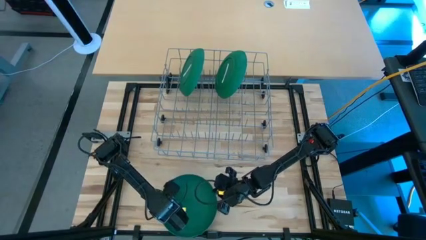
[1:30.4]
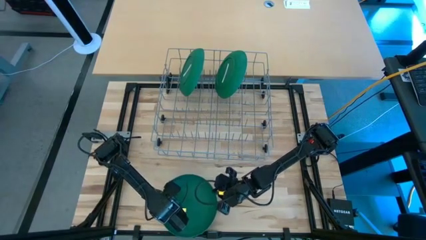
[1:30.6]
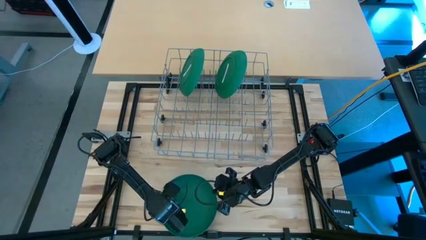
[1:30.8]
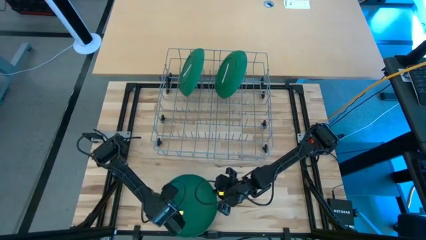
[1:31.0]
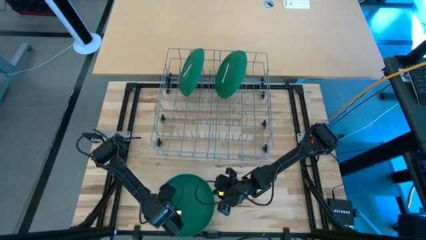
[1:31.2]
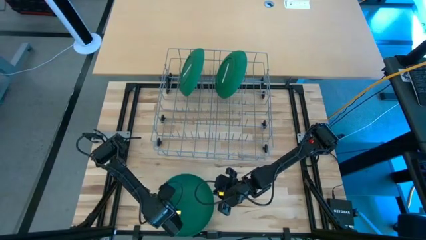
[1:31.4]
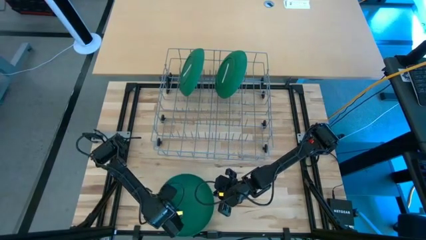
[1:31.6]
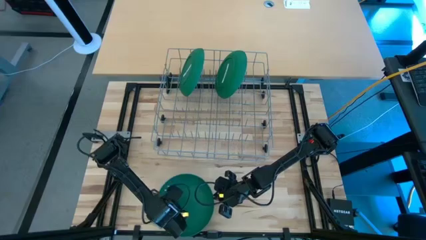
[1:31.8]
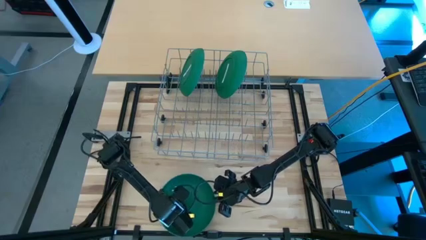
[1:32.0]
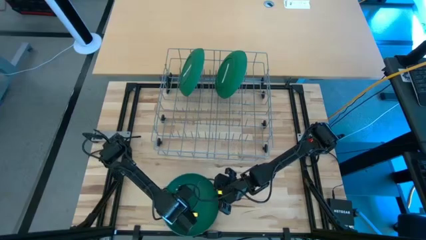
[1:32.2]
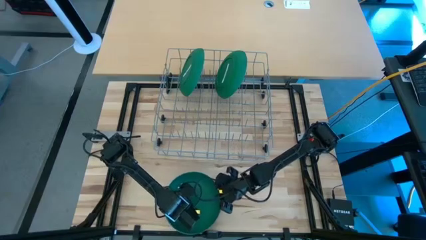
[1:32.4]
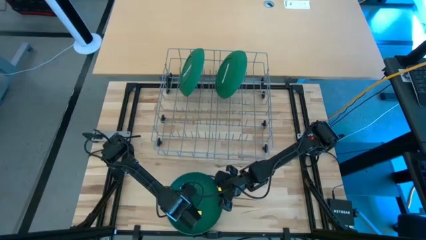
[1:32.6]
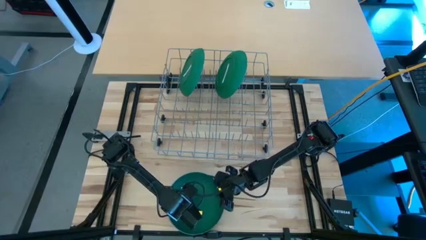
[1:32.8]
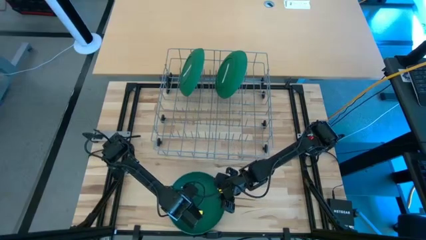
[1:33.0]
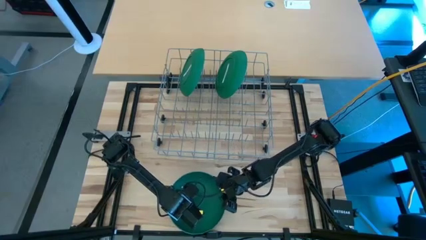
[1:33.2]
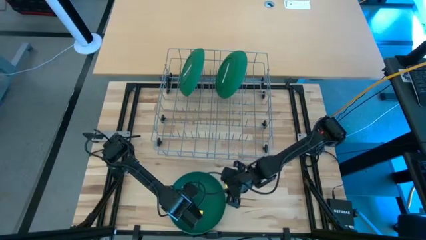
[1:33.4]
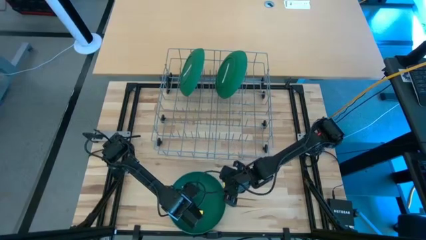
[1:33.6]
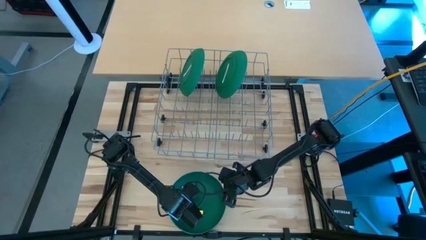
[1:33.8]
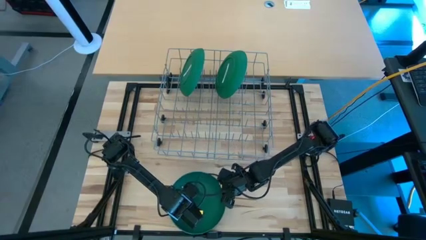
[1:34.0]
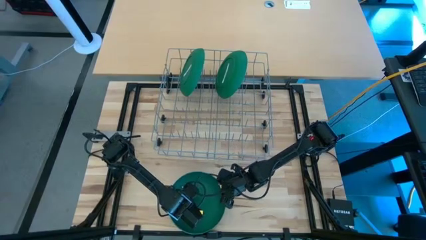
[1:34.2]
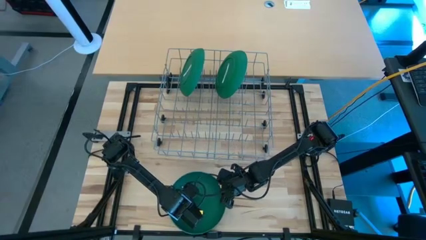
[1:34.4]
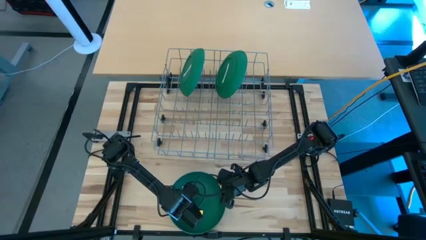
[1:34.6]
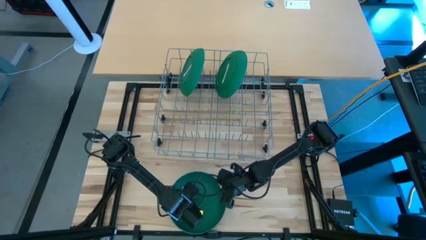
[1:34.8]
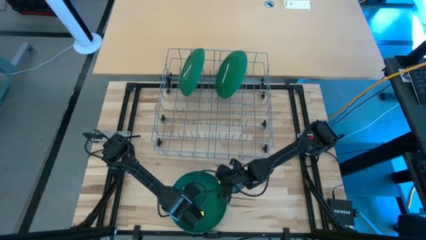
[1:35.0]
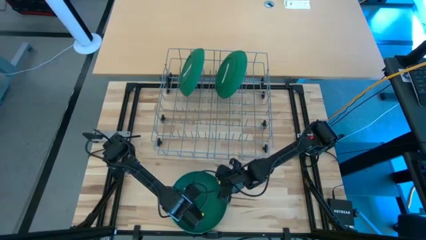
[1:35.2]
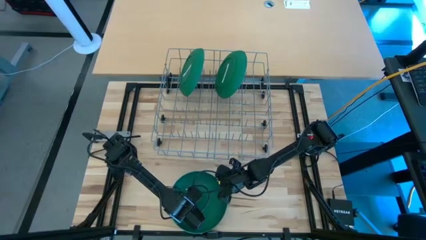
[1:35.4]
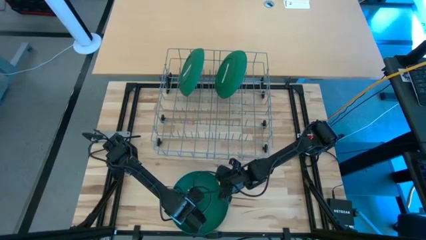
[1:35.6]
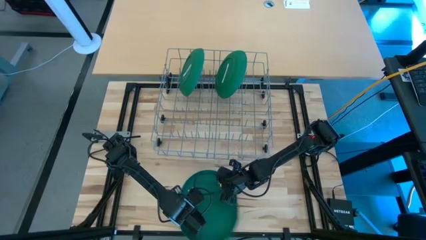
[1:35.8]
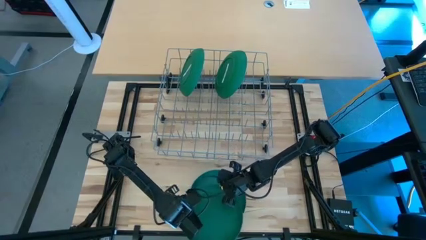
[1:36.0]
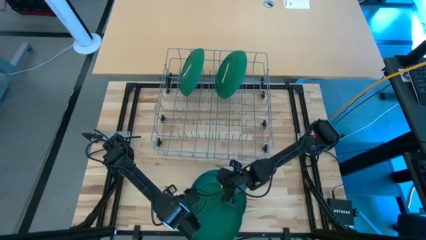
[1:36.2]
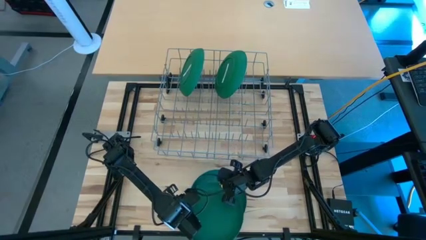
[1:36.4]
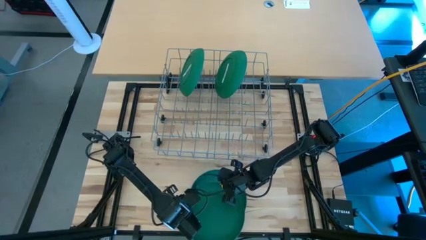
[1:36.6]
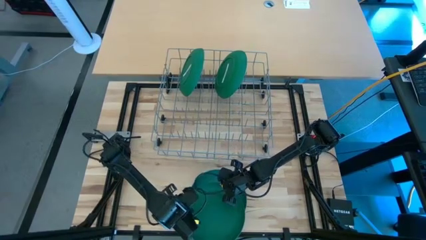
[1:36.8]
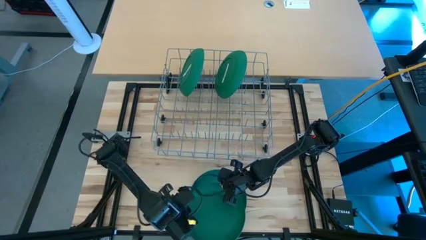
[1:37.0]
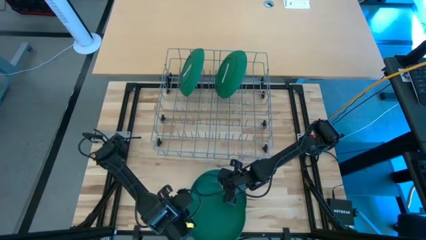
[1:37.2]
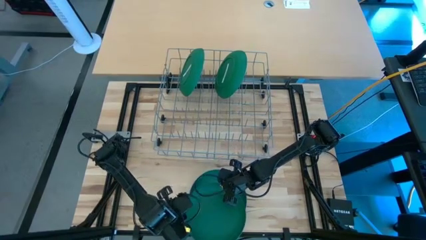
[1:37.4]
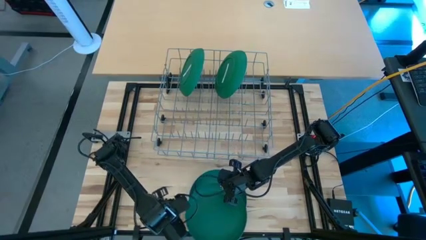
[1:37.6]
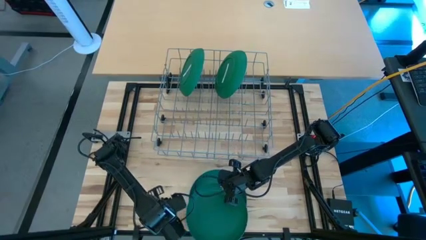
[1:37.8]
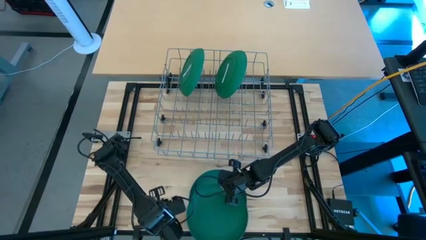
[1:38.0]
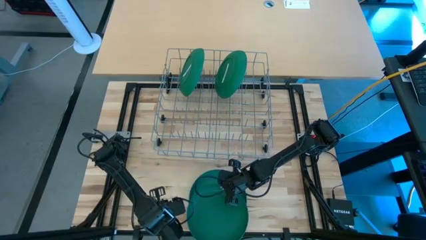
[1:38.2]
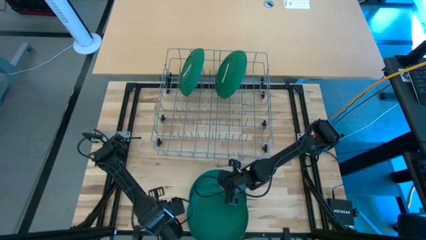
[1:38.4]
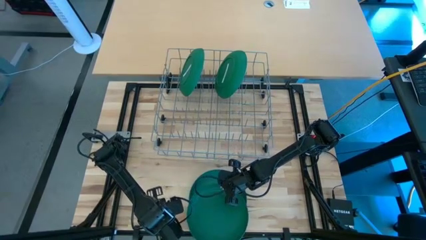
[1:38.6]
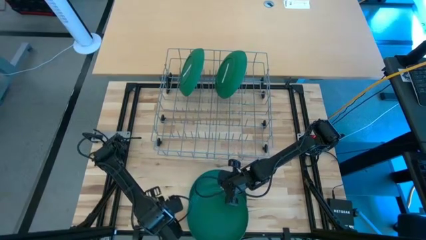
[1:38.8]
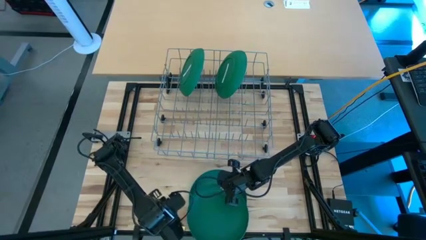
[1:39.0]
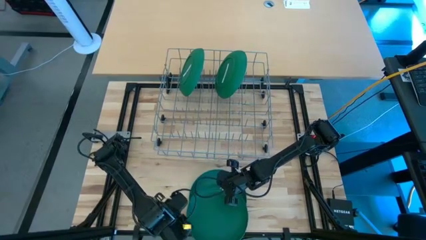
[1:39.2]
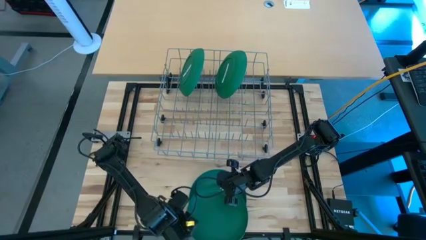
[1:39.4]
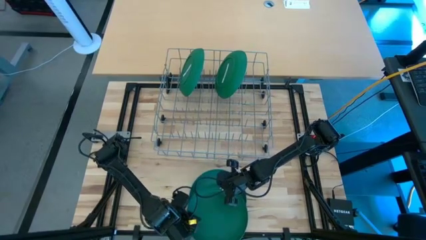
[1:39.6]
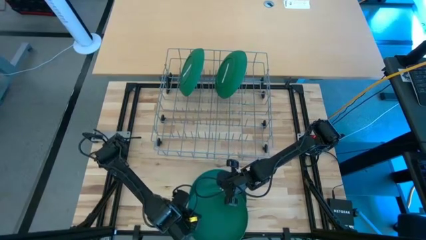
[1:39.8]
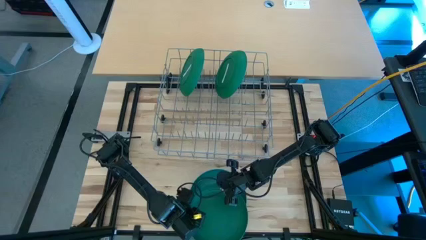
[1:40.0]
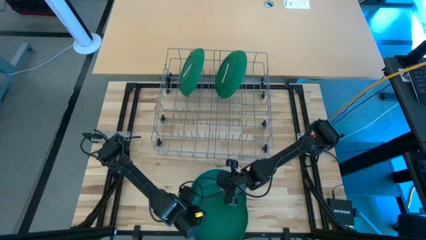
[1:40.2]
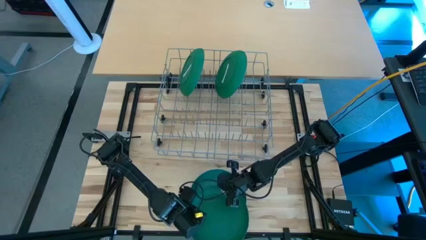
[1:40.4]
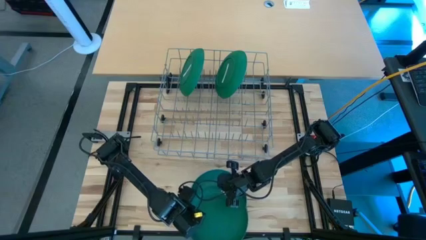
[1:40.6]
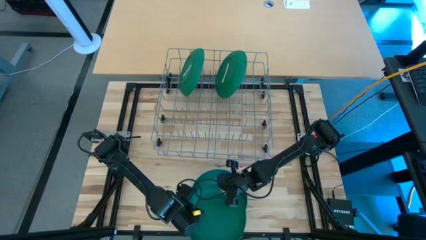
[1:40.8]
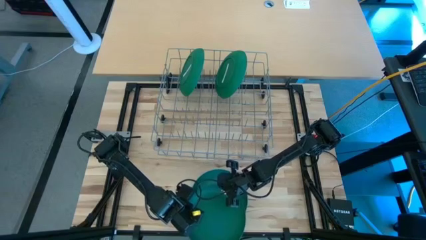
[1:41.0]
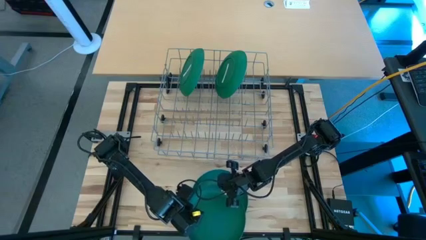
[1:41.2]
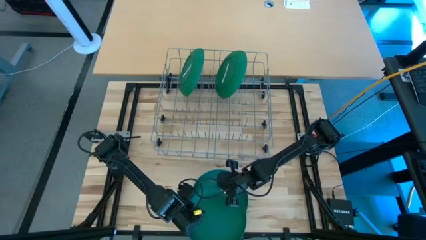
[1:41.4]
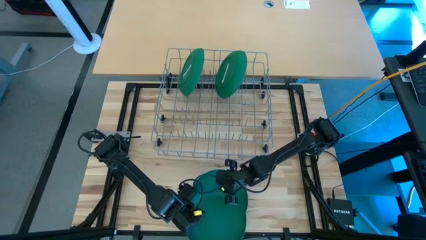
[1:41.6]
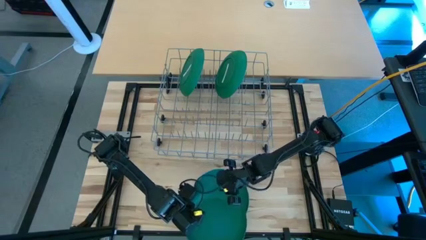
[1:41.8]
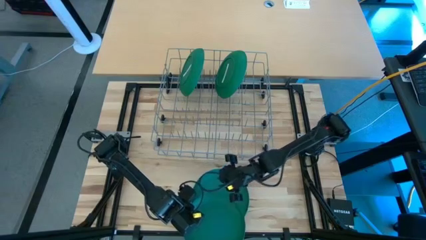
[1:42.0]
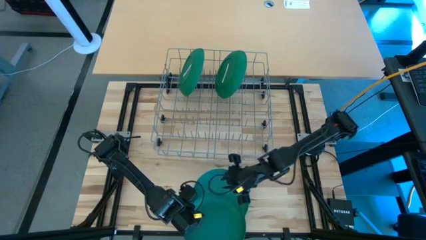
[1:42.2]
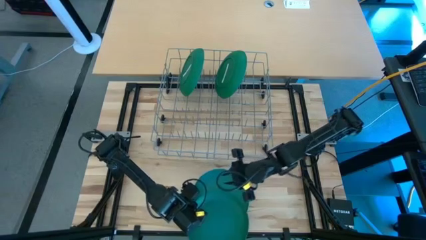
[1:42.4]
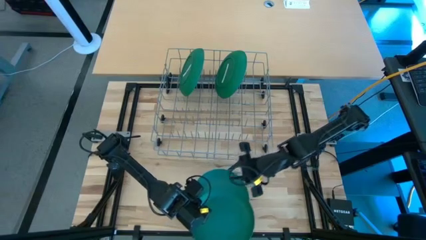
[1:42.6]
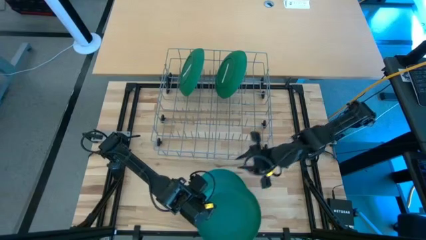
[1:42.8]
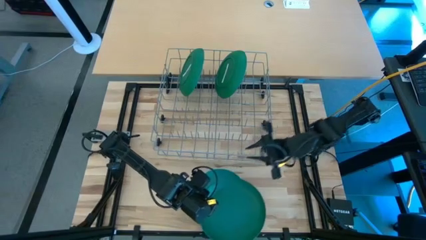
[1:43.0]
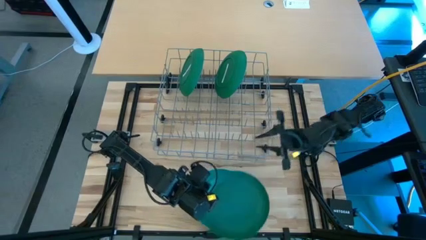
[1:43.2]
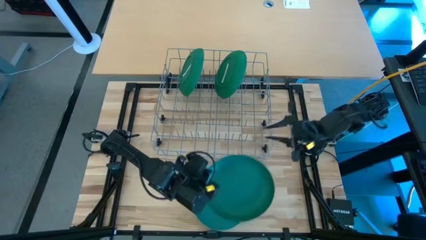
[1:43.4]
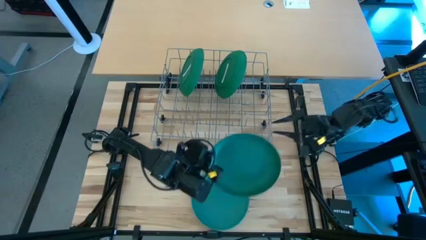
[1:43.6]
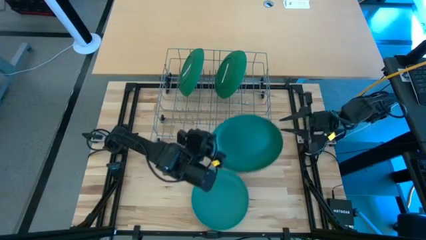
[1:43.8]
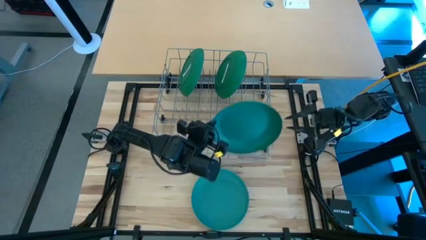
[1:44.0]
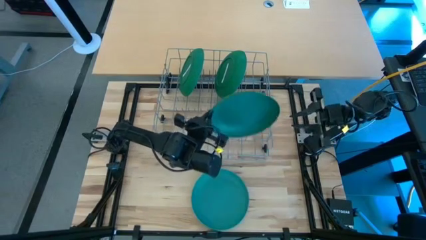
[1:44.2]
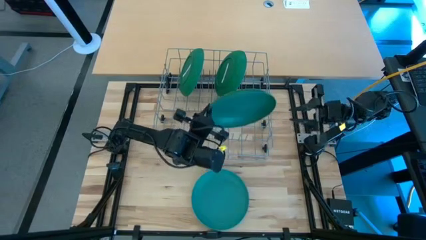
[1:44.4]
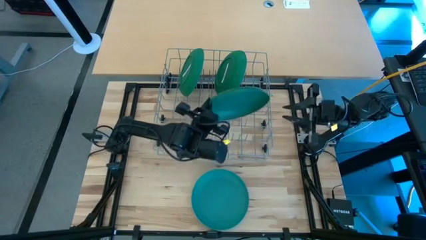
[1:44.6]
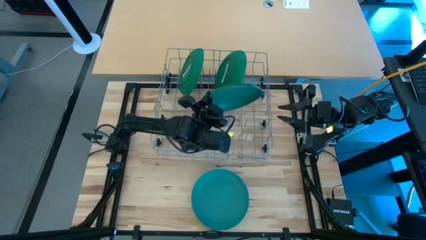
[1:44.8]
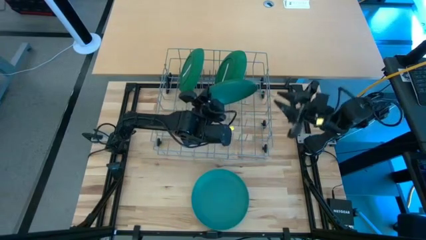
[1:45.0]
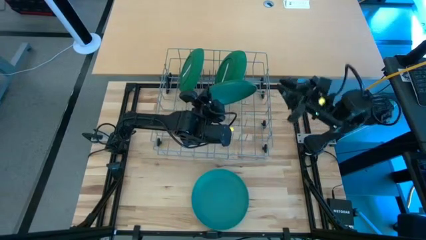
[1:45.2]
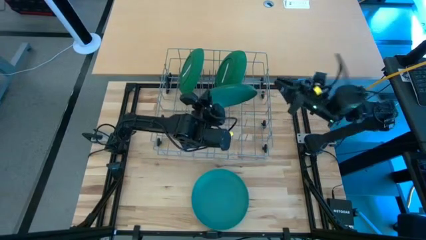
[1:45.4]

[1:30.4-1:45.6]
Task: Sort dishes
Put the top green plate in the dish rack
